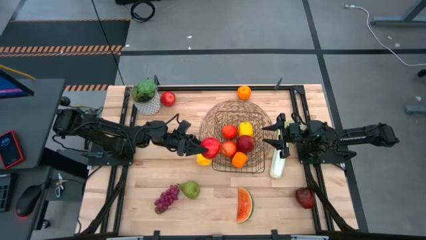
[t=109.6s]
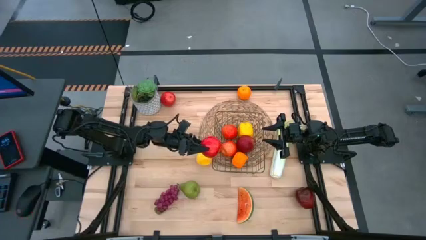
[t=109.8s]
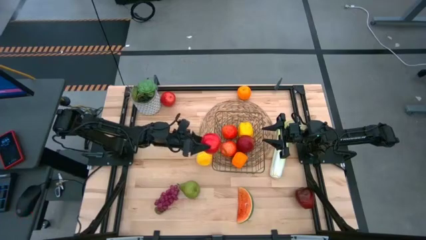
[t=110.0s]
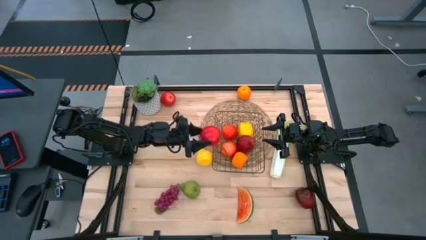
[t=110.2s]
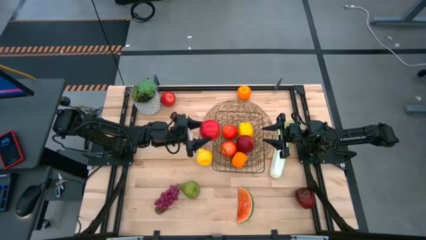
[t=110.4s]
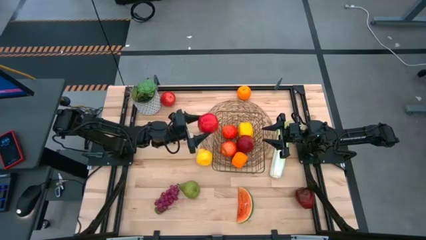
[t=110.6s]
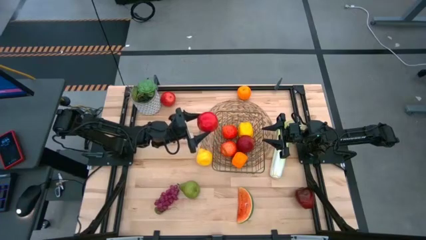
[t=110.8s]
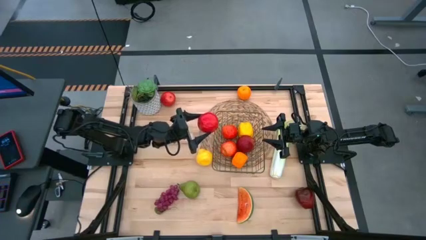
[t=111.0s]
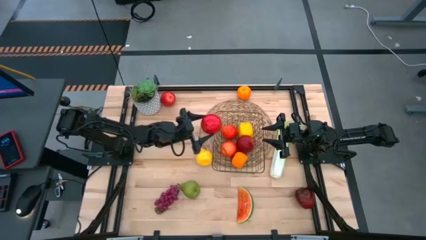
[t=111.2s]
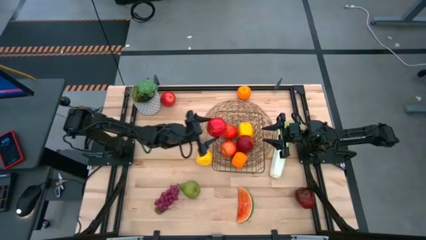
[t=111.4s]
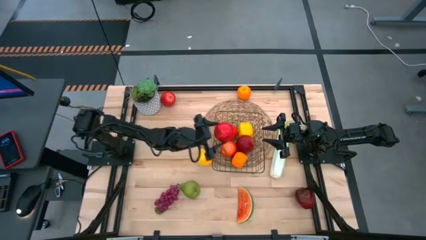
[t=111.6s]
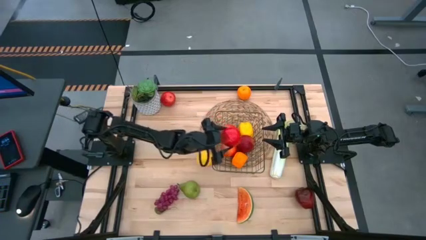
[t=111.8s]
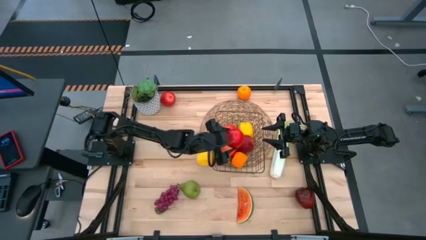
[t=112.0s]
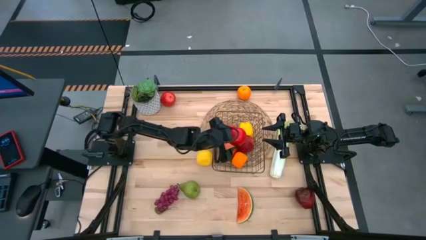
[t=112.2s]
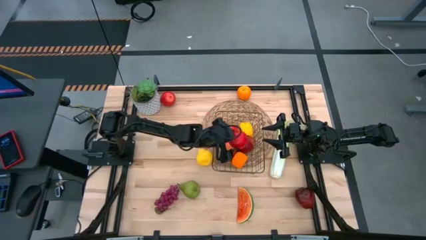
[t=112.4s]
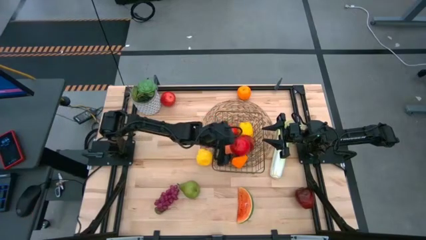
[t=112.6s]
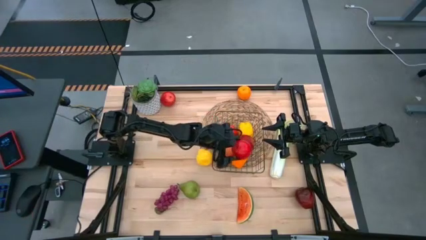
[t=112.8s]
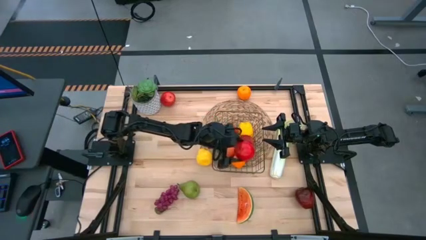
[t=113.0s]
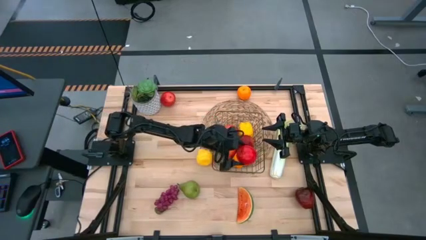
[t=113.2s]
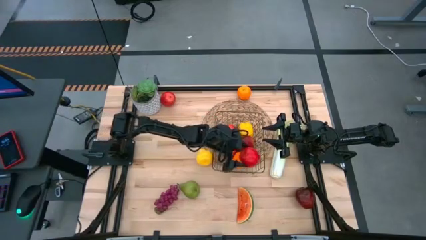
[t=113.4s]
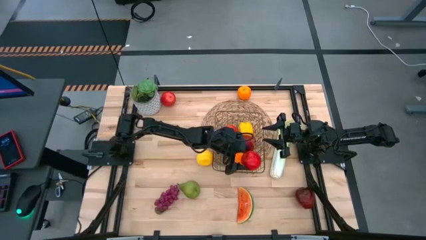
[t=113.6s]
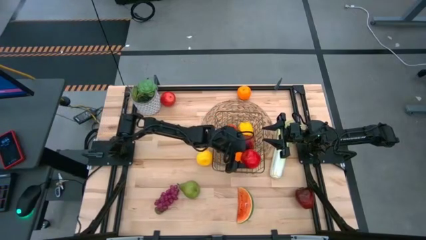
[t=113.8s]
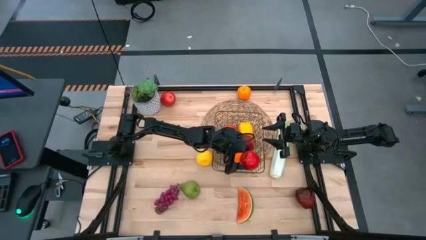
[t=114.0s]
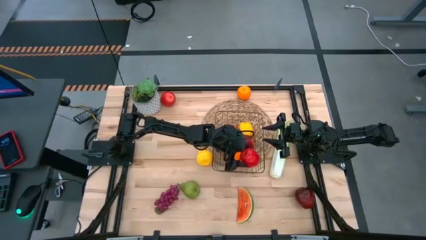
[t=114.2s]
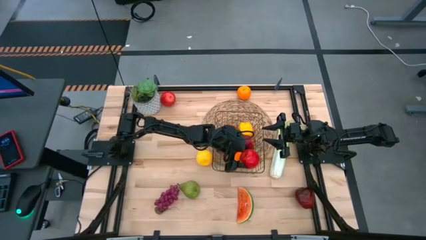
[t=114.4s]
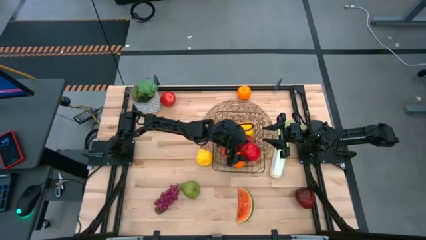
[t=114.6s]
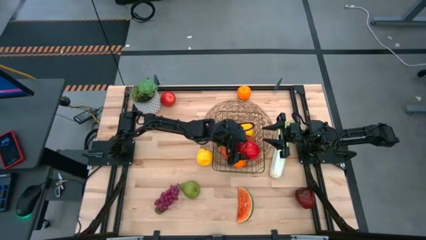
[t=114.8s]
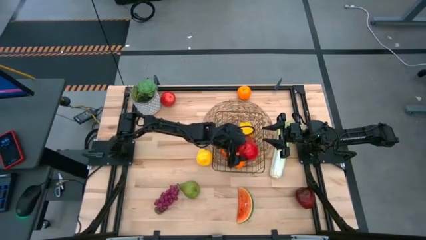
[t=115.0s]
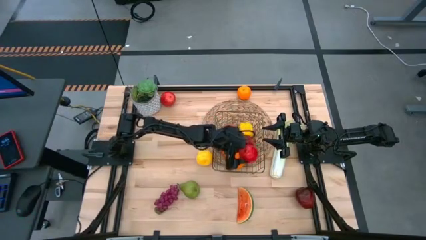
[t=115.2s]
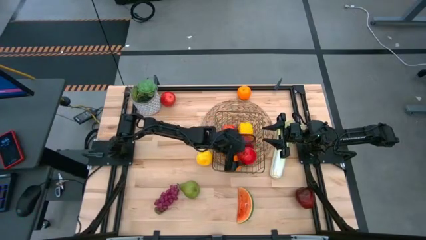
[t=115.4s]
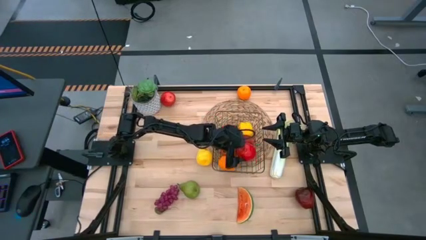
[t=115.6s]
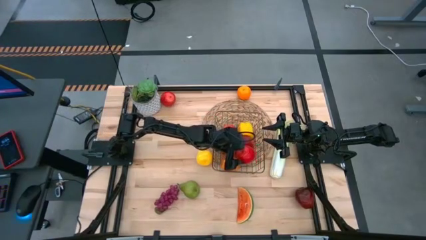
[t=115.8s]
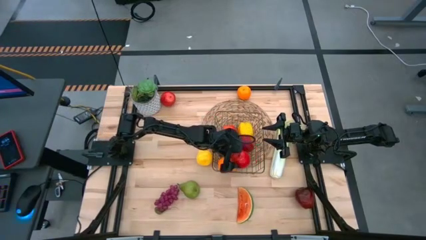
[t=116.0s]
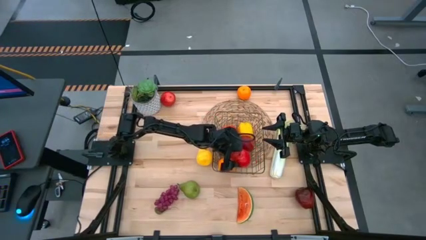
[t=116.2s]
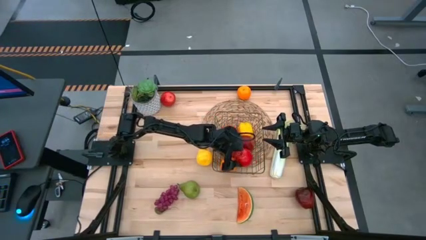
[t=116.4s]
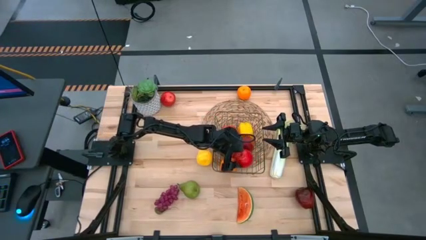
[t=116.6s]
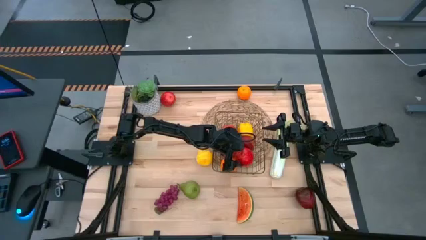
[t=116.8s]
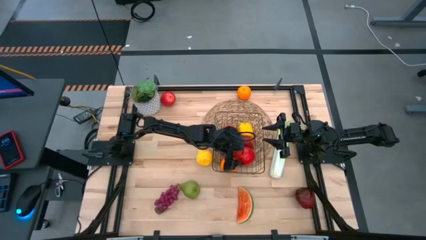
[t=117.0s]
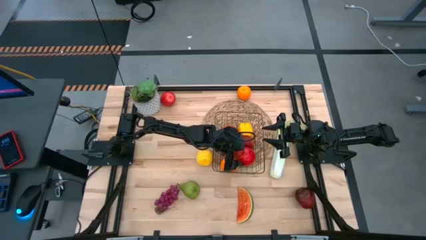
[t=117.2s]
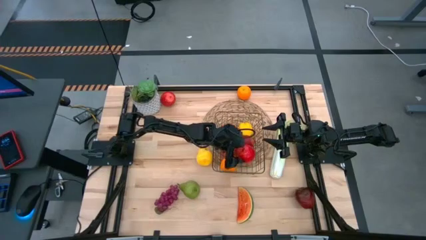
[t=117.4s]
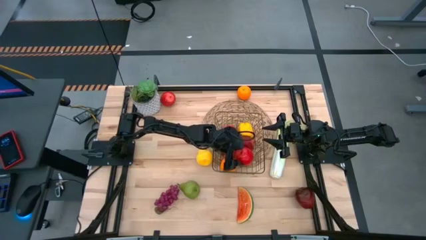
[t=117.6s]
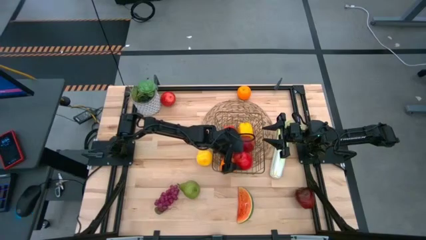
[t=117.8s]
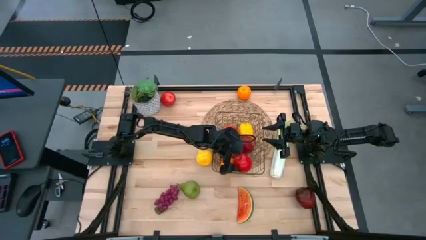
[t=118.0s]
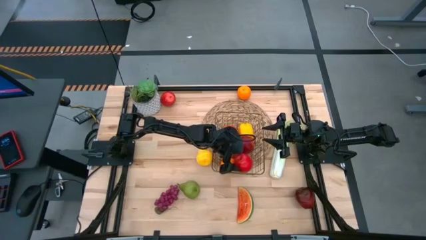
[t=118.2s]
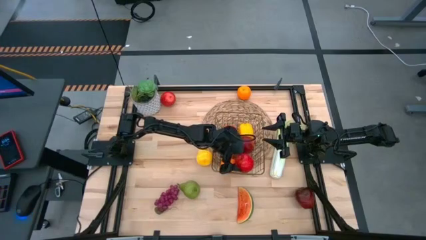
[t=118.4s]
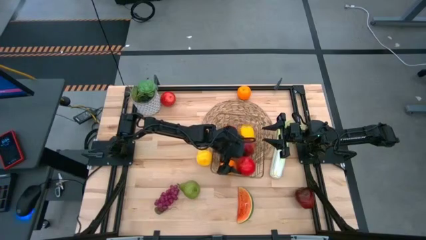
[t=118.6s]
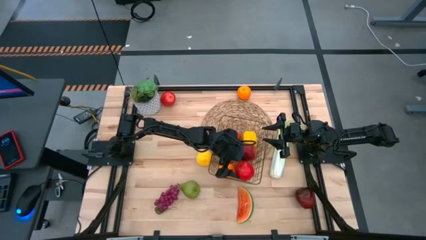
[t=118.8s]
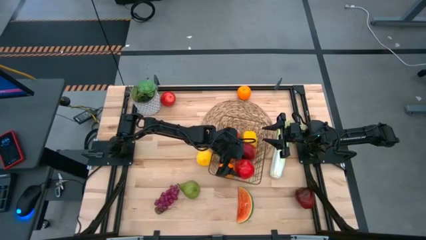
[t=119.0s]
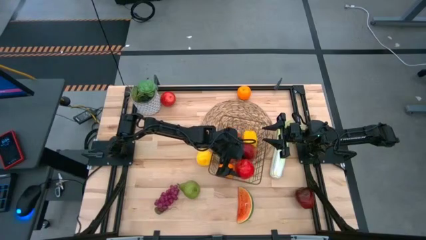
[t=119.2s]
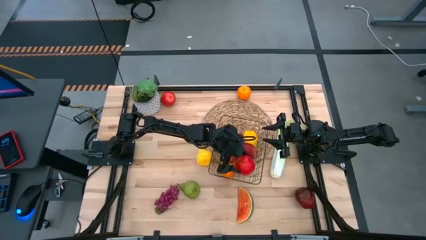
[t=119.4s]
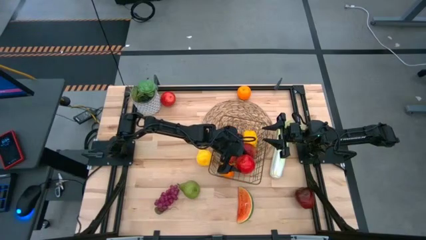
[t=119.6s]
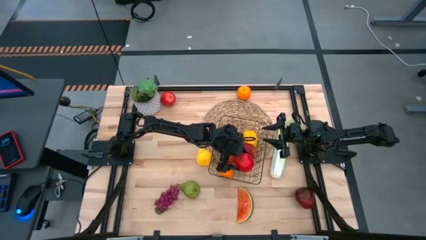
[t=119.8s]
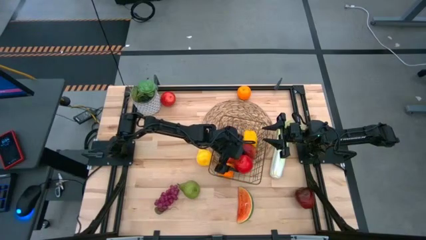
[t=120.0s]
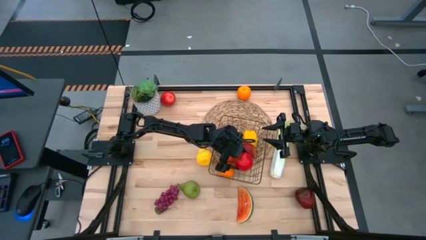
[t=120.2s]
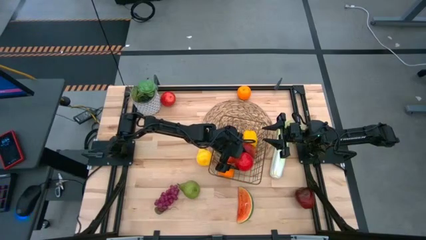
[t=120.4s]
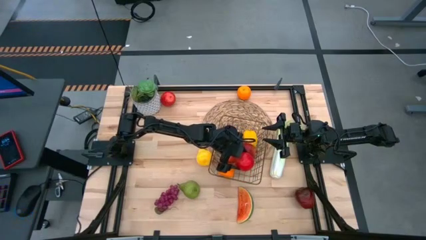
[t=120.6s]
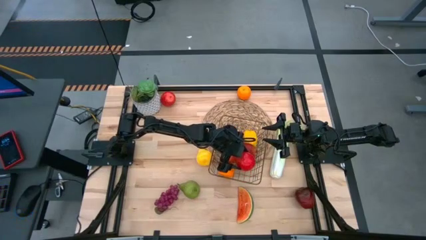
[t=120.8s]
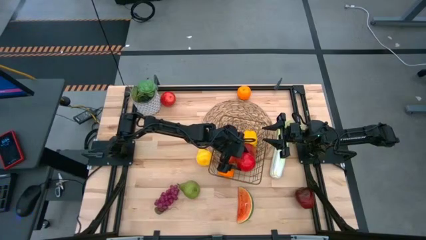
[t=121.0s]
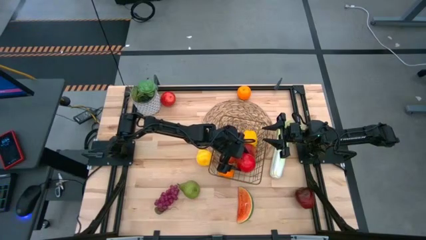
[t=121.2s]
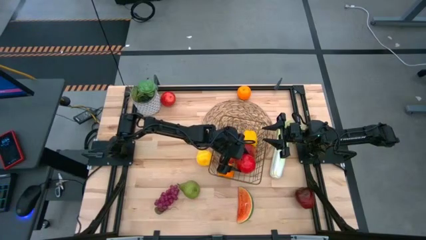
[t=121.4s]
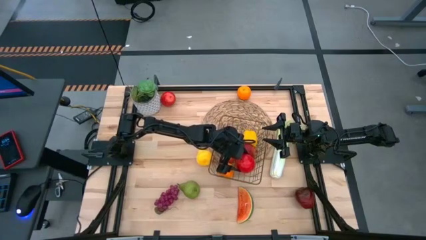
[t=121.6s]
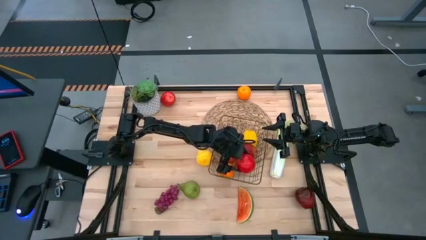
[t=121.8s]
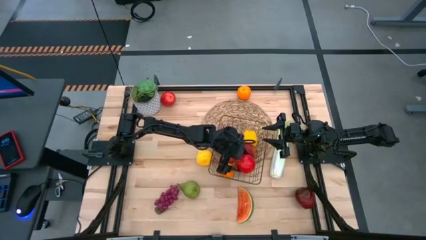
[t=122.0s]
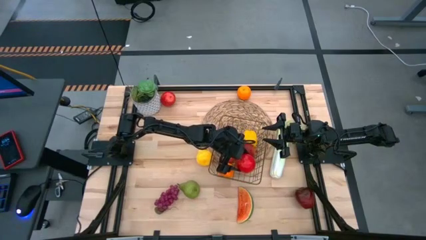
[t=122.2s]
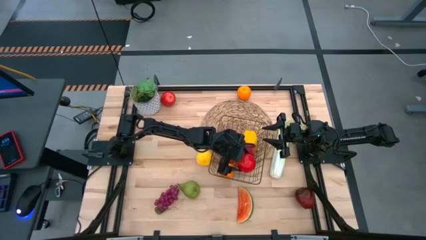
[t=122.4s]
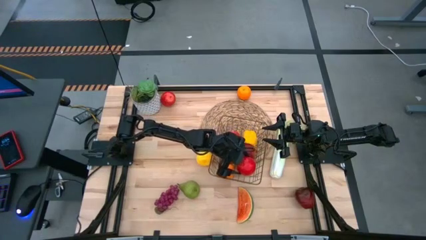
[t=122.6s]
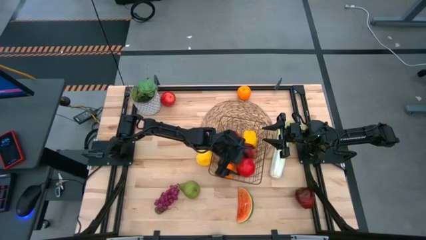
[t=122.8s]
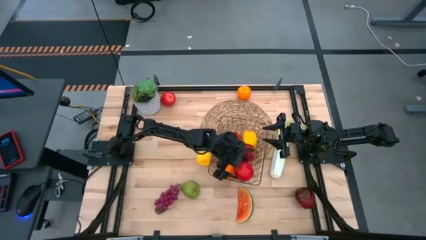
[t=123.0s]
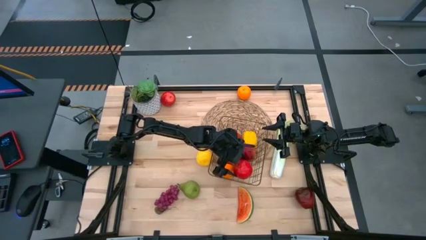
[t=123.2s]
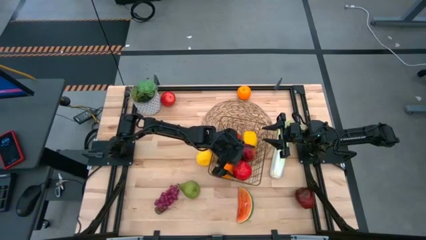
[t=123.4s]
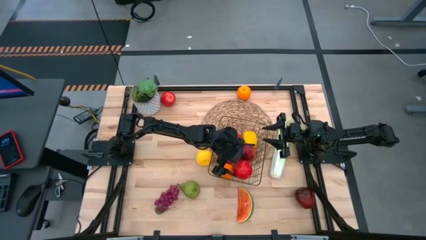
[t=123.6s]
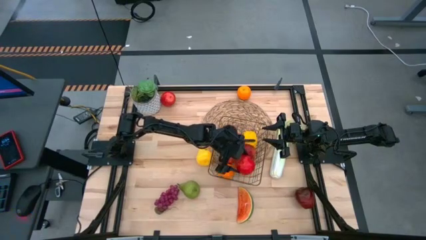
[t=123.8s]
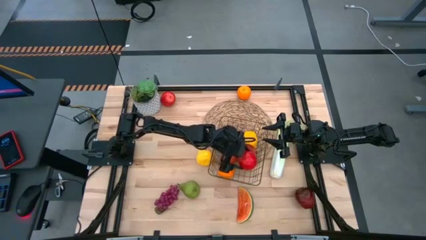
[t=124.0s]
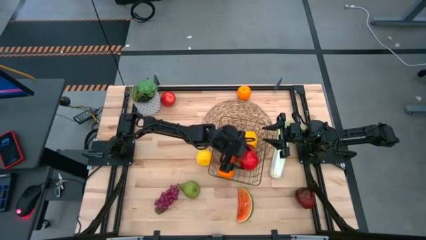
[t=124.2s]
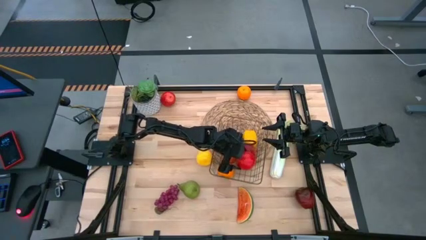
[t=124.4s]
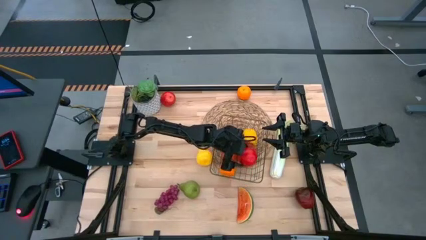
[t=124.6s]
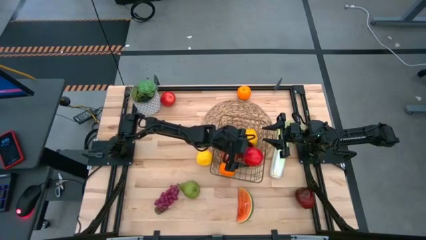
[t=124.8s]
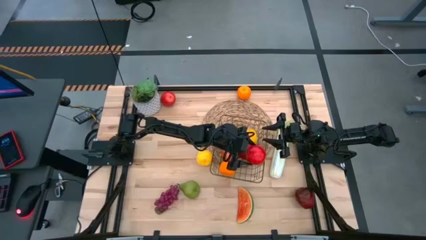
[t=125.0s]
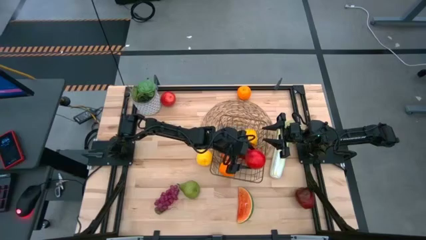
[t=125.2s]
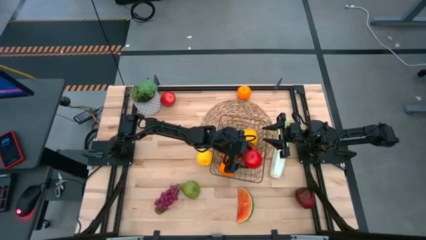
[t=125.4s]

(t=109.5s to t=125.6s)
Task: Build produce basket
Put the bottom red apple into the wire basket
